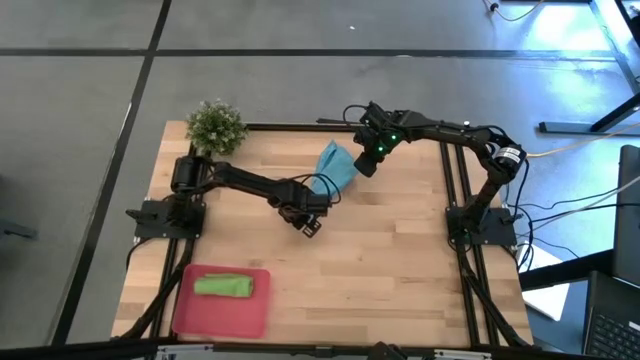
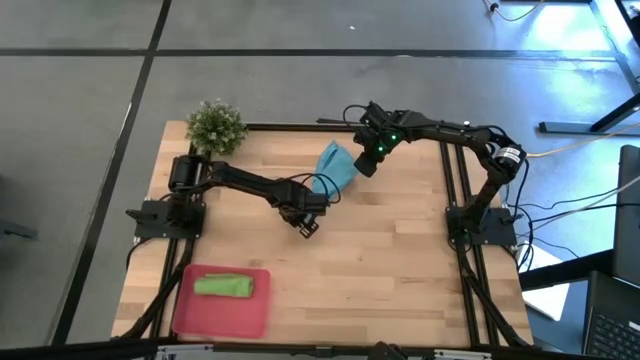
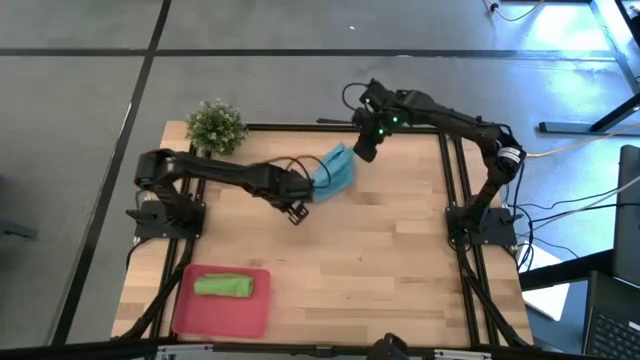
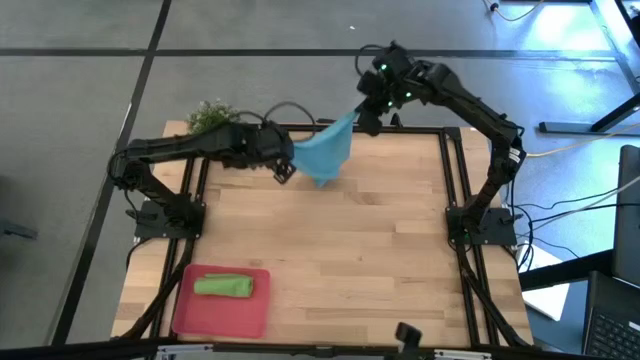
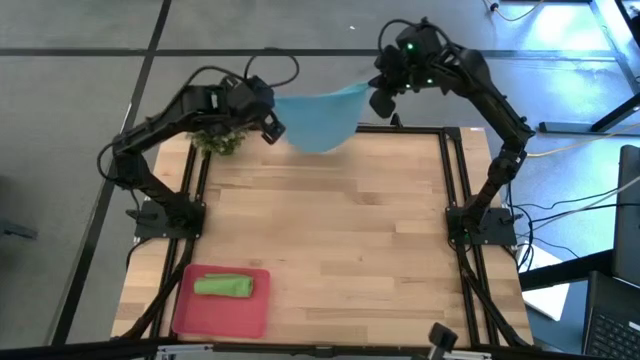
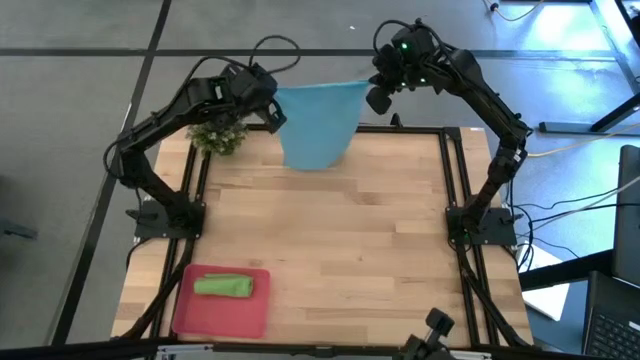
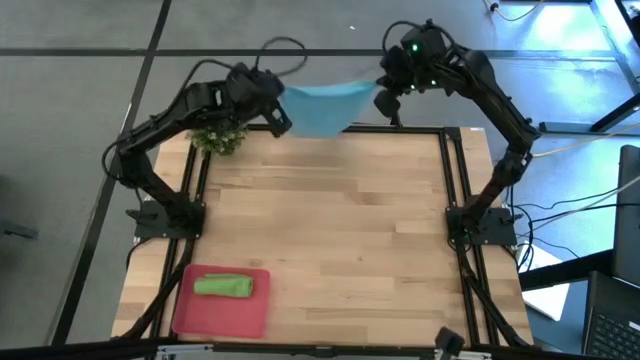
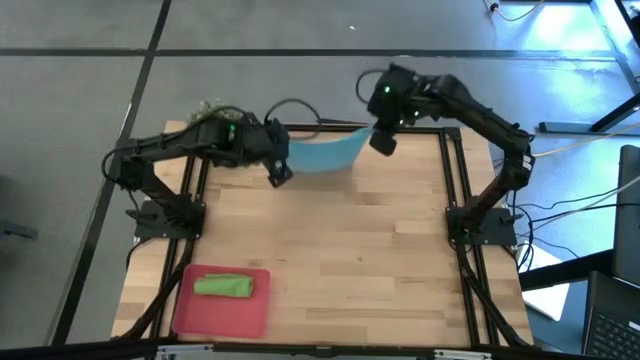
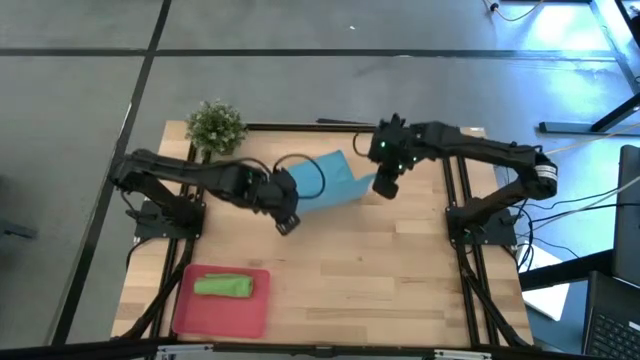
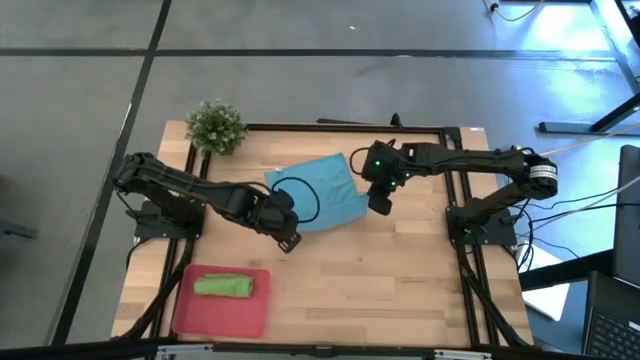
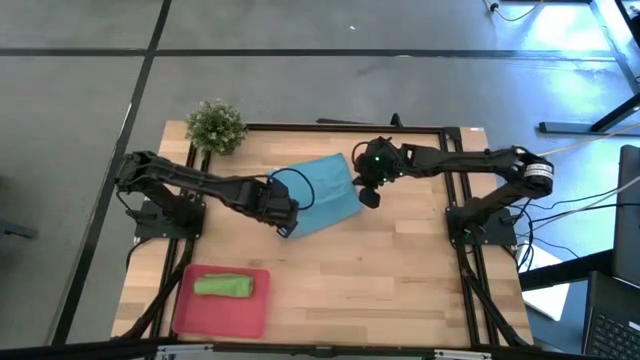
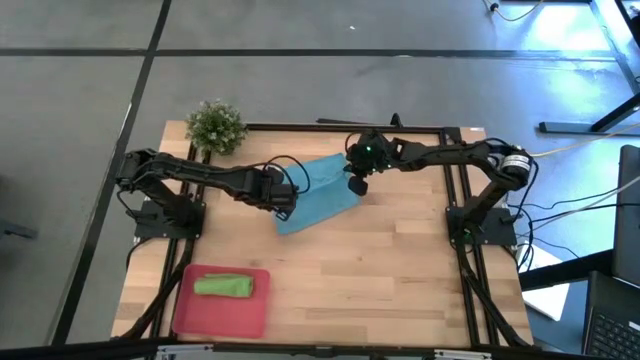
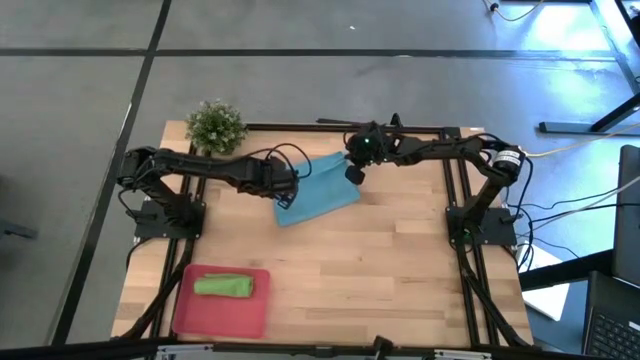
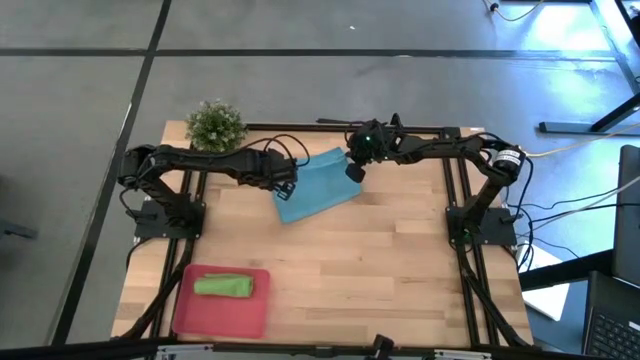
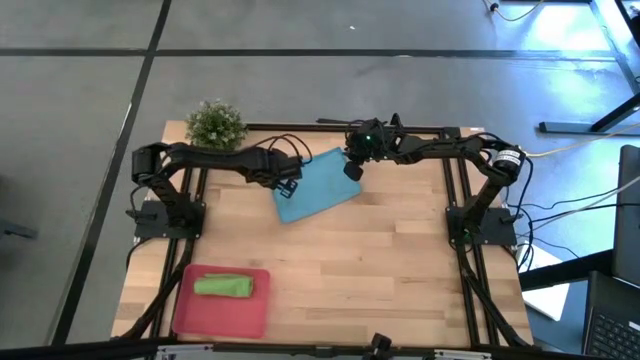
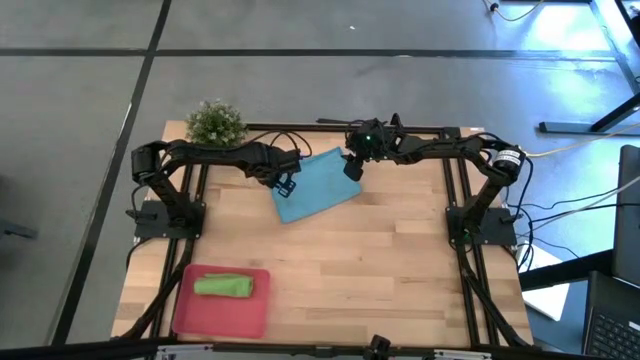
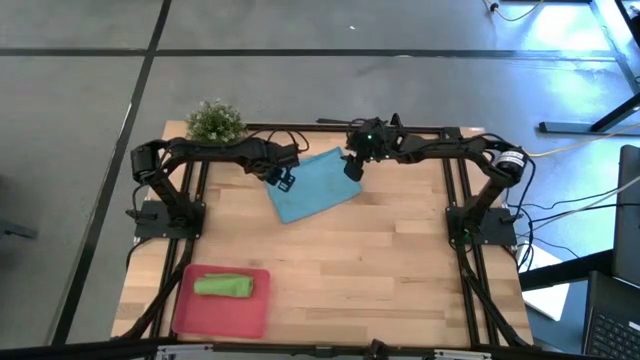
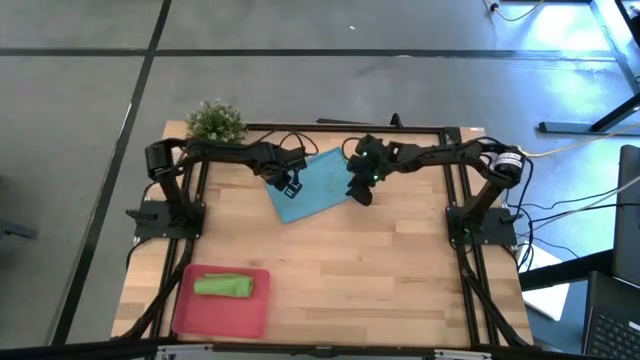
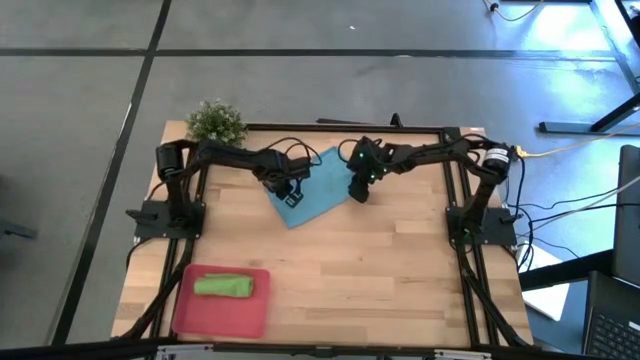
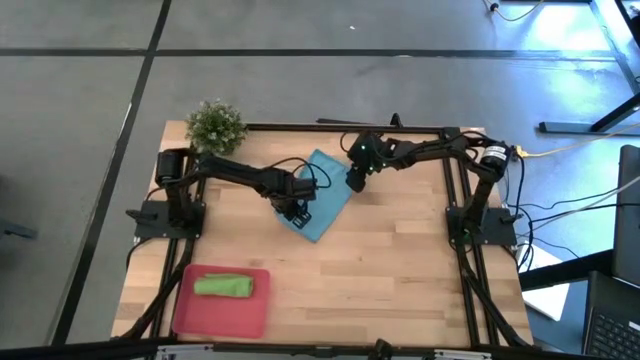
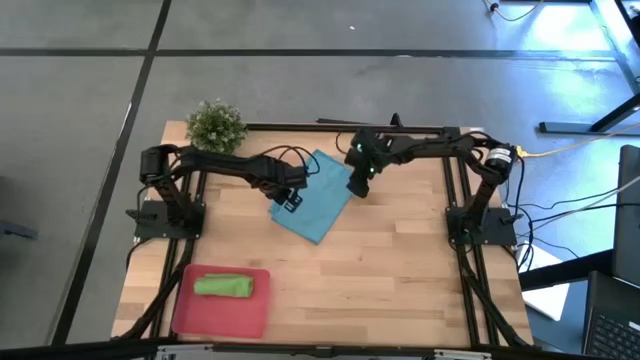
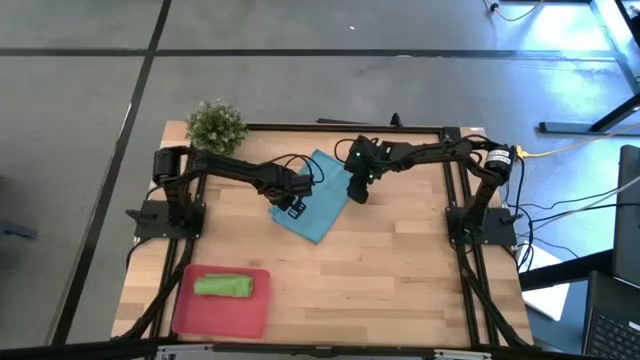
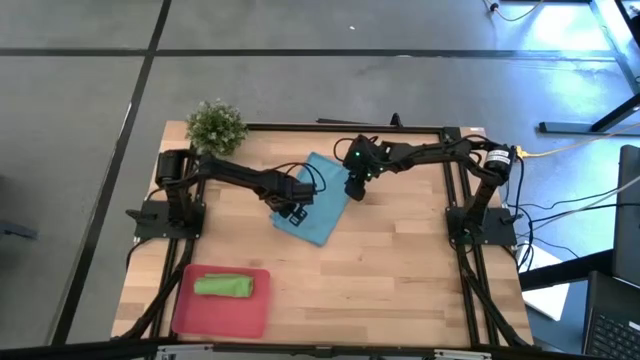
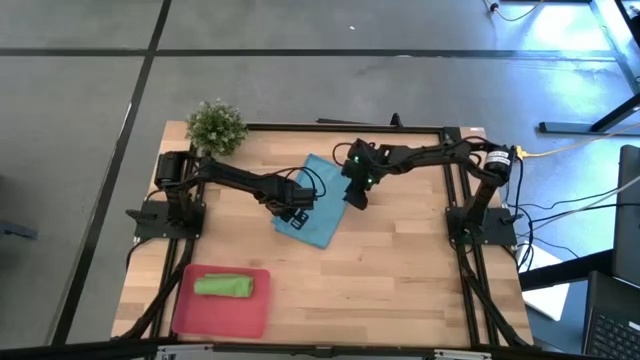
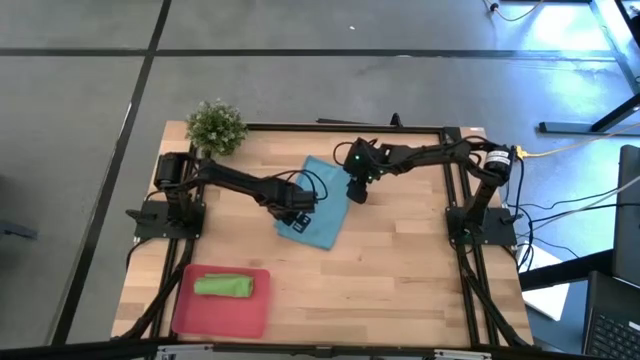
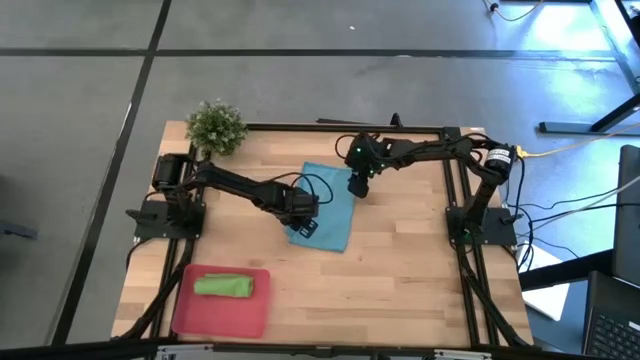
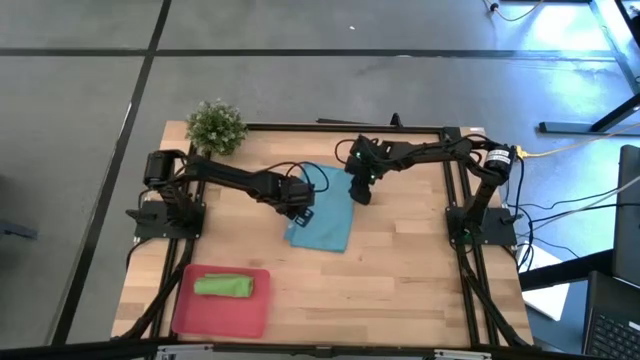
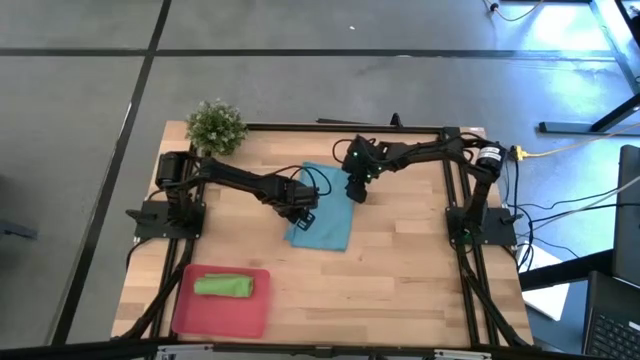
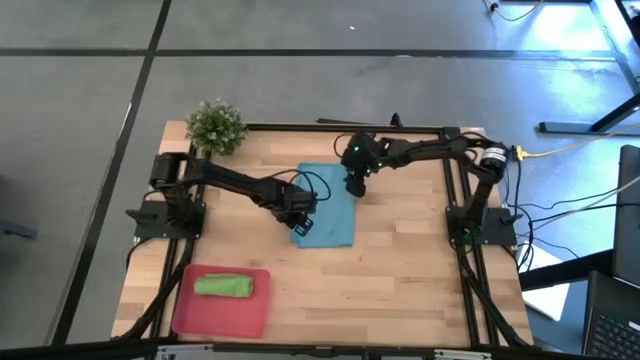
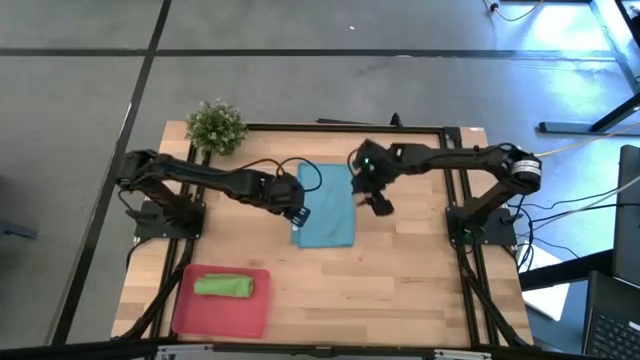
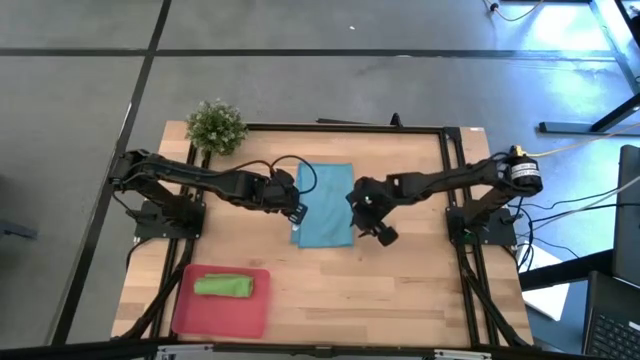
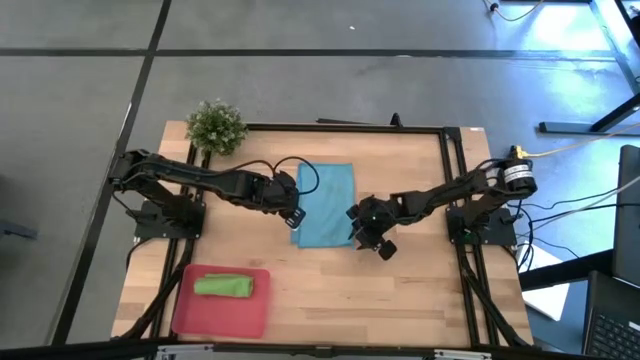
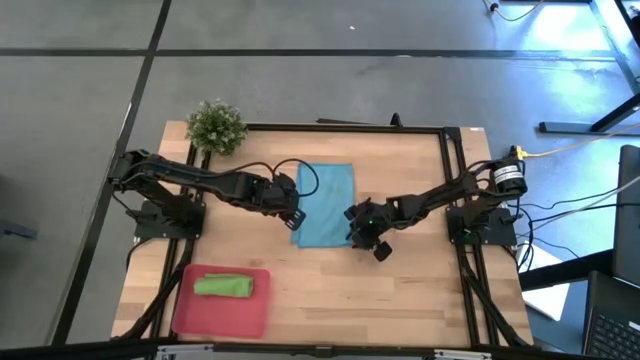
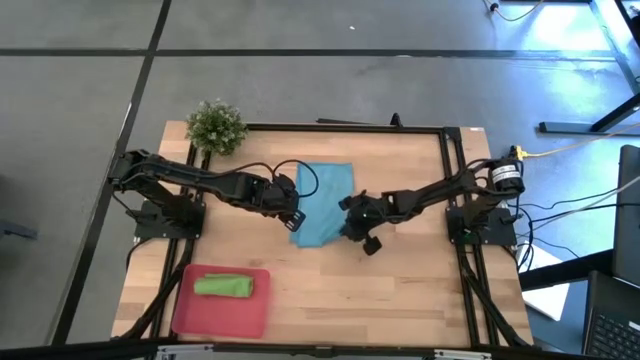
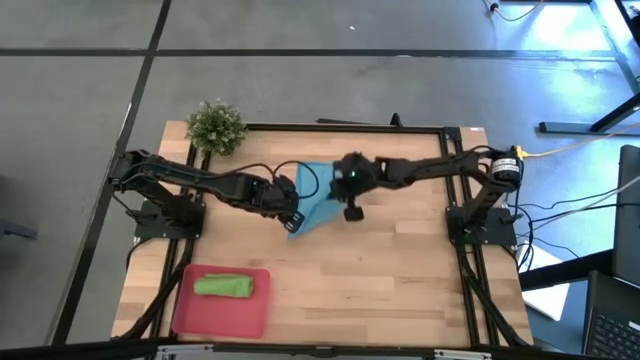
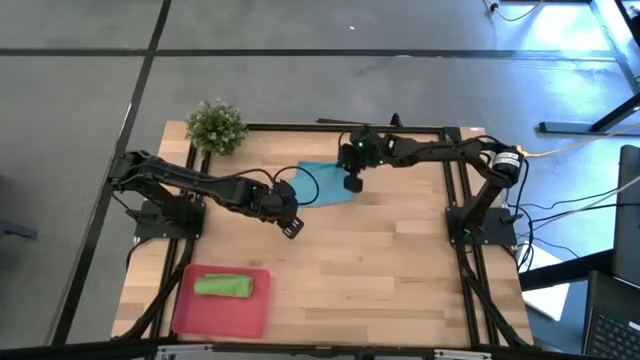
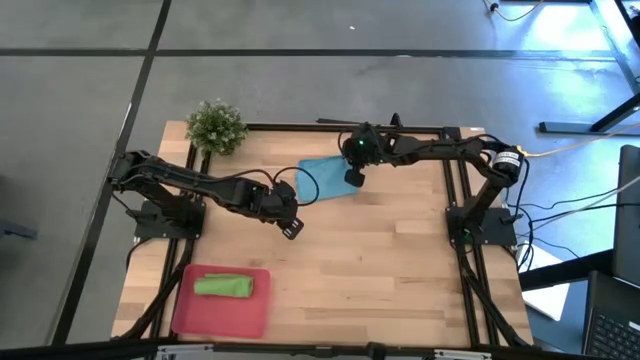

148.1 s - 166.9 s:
Task: Roll microfiber towels into tight, uniform cylinder then place into a basket
Roll the microfiber blue towel
